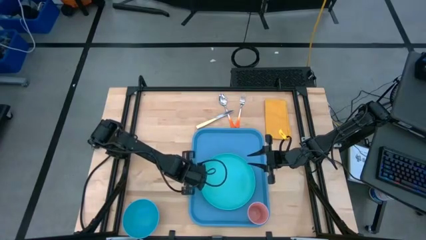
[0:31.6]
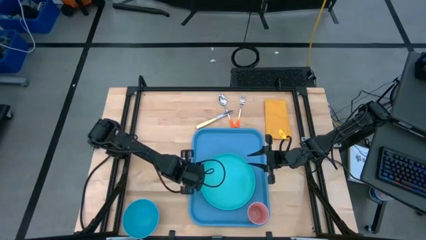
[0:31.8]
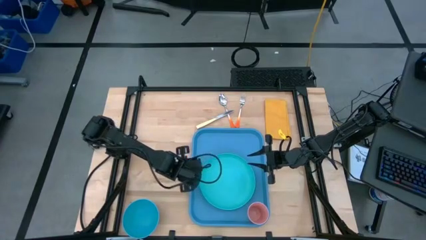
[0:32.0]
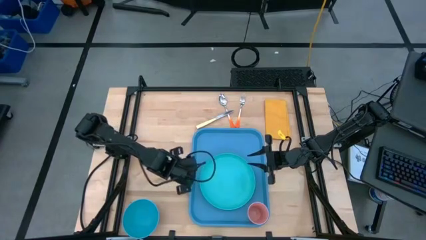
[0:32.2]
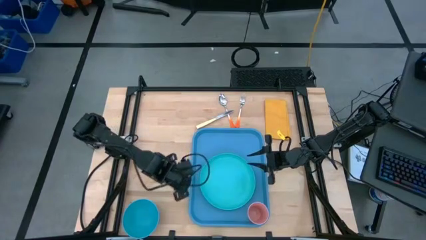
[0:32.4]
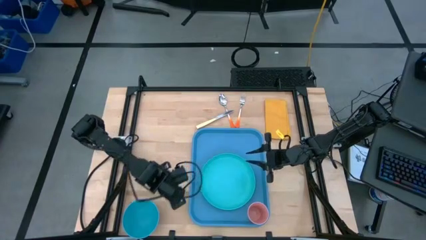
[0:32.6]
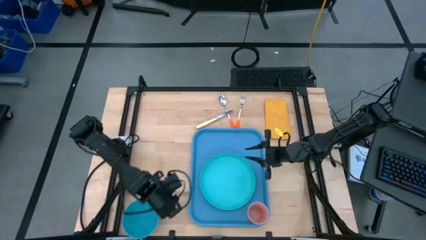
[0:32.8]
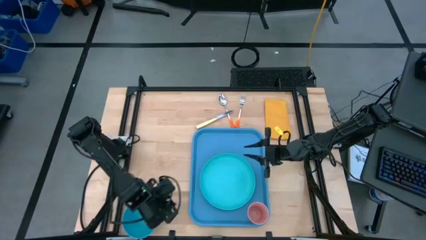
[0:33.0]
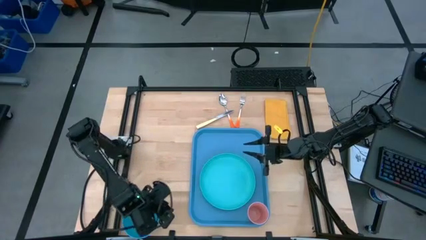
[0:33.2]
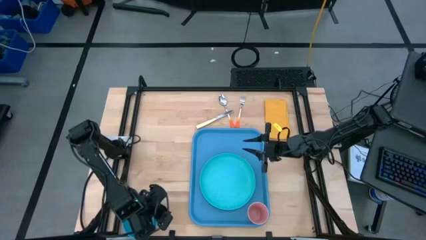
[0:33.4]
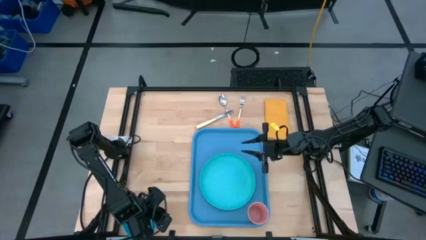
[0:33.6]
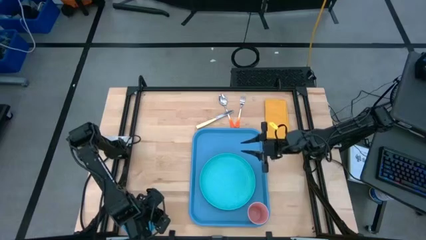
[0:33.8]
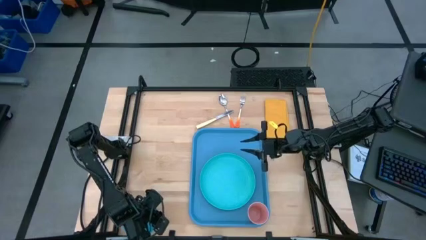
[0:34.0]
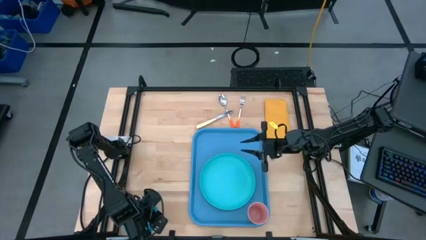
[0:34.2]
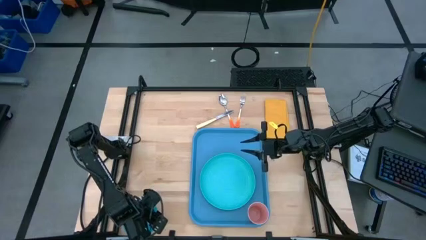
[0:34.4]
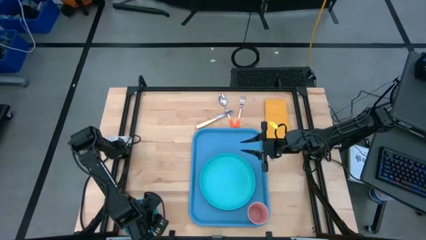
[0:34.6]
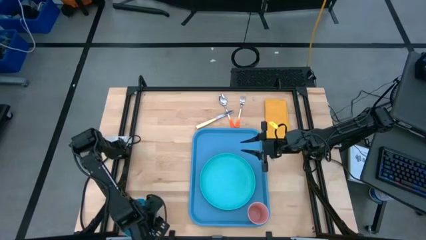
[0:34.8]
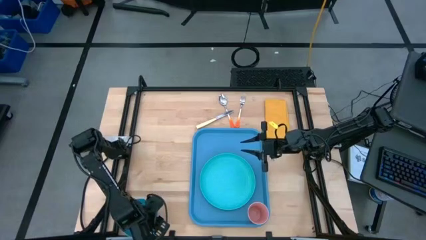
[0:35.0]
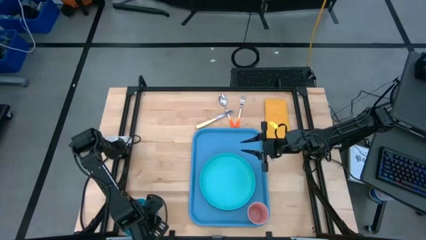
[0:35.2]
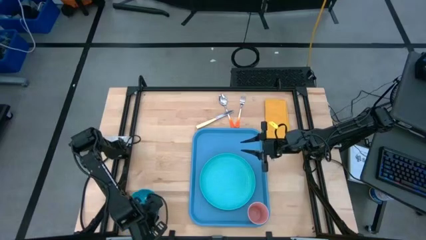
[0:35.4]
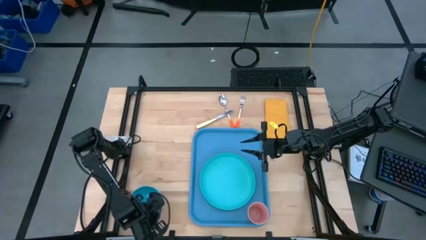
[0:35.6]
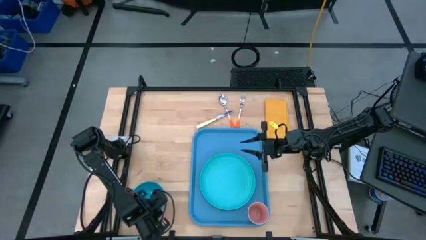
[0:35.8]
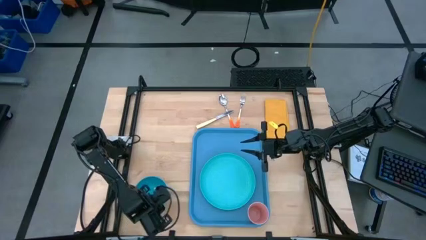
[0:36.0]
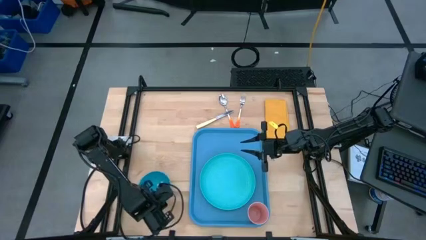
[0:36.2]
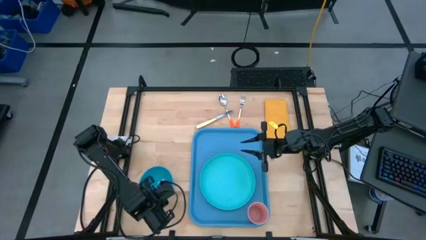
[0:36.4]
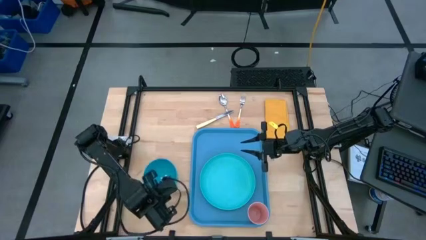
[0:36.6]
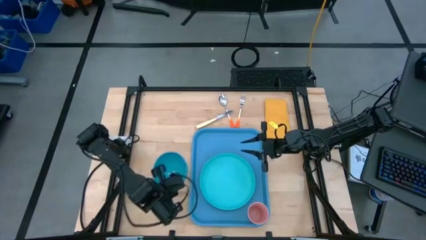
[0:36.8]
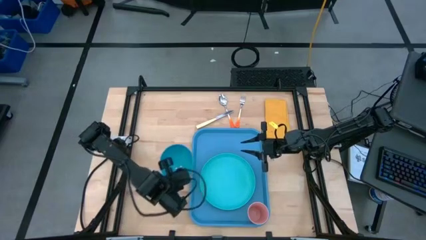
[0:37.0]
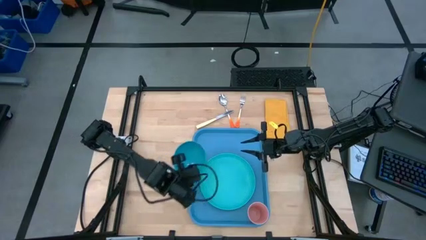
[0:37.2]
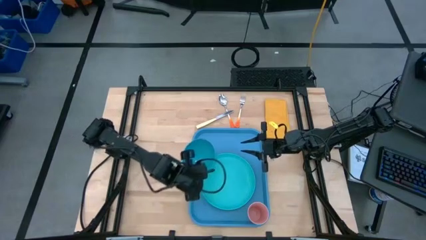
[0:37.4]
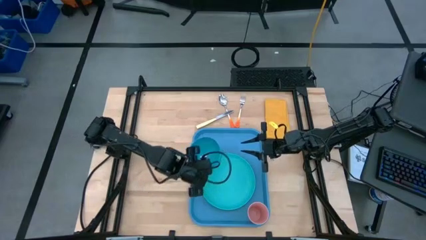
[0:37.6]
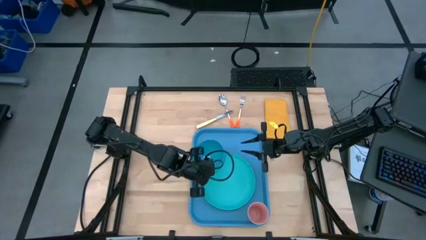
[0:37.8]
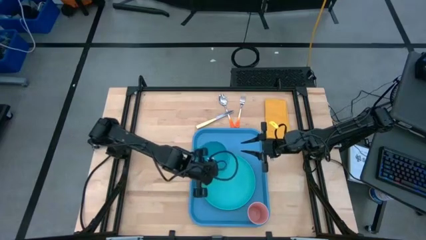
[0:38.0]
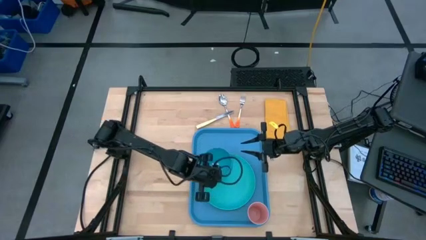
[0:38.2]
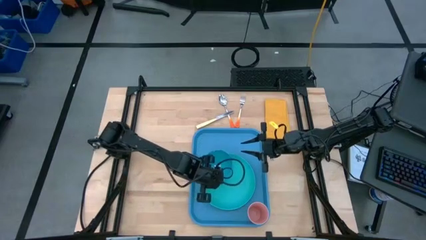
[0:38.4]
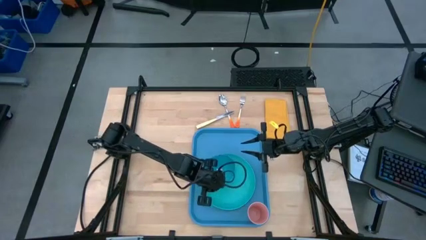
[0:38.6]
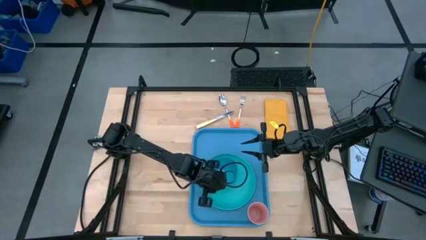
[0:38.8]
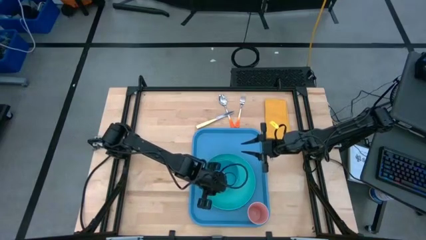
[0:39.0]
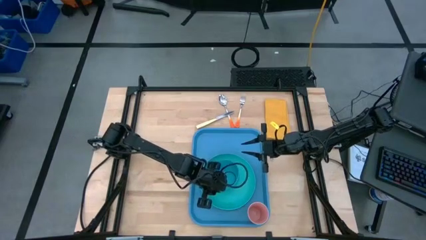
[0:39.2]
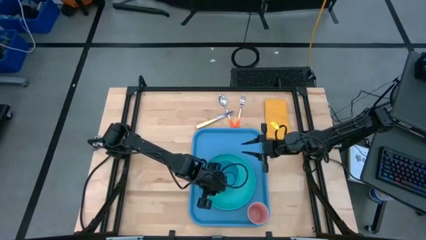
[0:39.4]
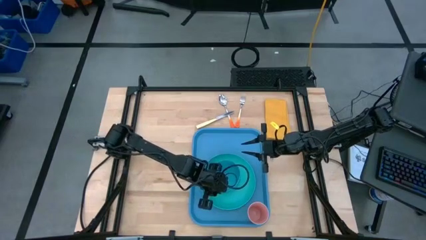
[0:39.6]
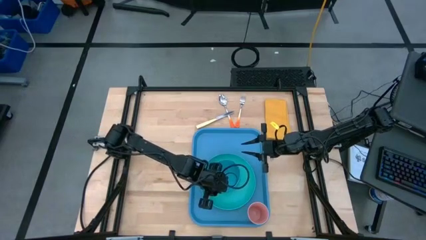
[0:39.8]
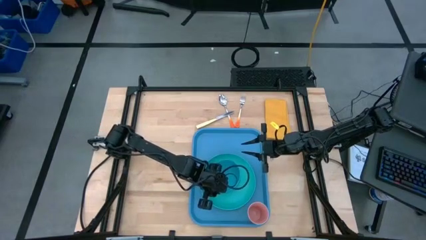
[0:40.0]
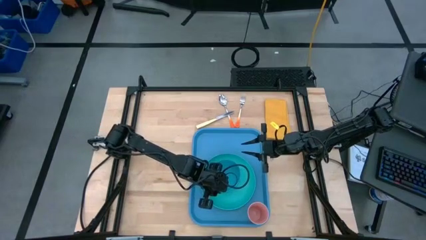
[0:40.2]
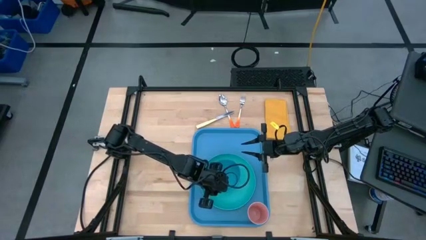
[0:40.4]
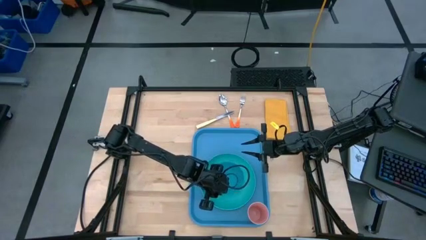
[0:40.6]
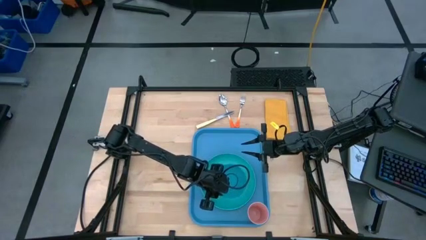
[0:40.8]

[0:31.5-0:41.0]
Task: Set up tray
Put the blue bowl on the plate on the blue serving tray

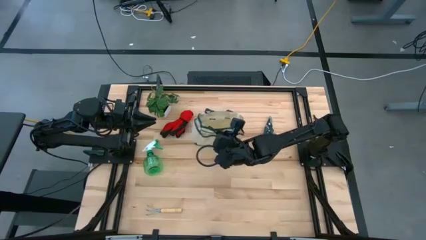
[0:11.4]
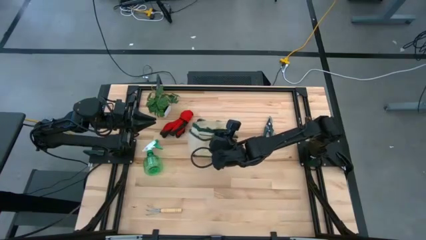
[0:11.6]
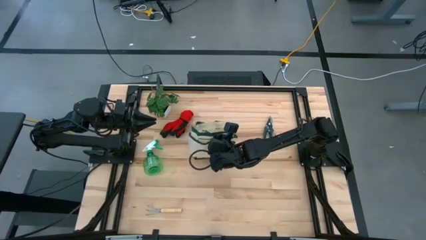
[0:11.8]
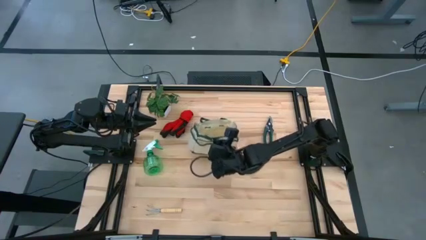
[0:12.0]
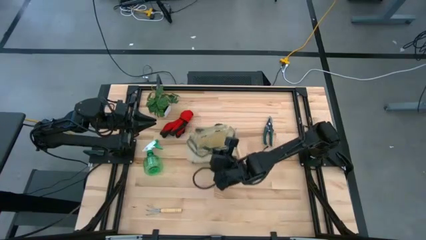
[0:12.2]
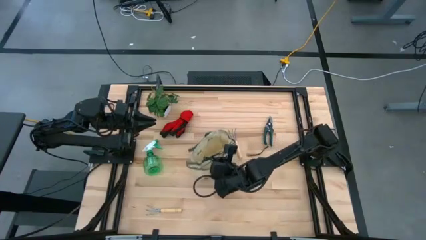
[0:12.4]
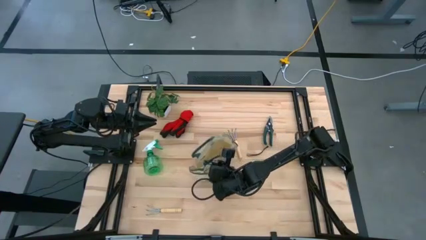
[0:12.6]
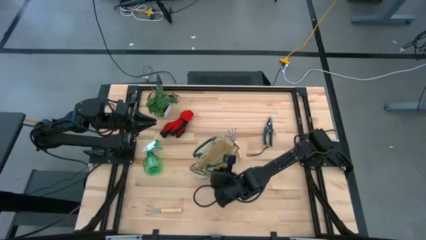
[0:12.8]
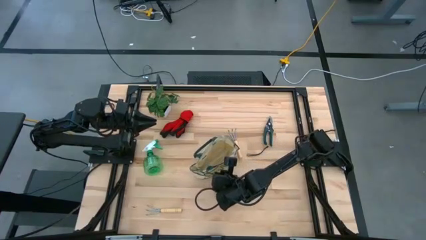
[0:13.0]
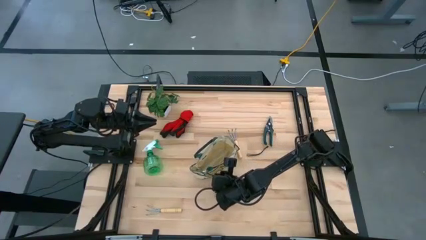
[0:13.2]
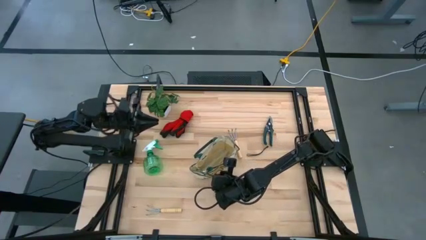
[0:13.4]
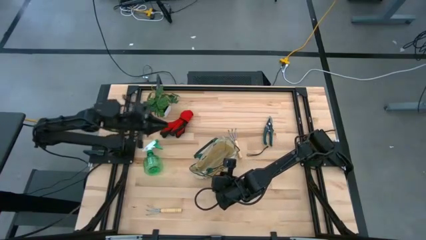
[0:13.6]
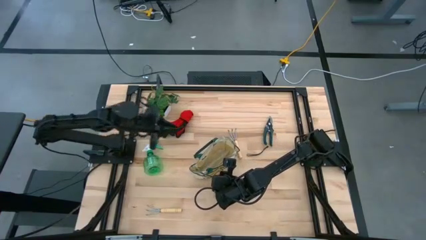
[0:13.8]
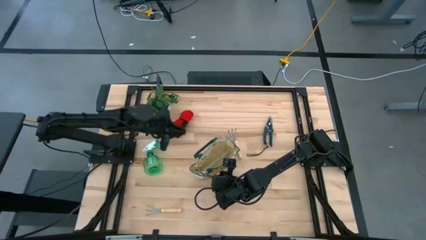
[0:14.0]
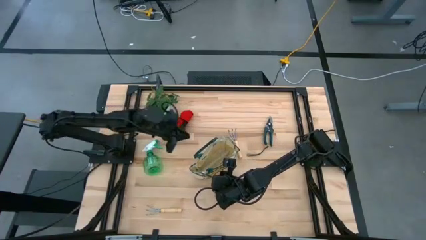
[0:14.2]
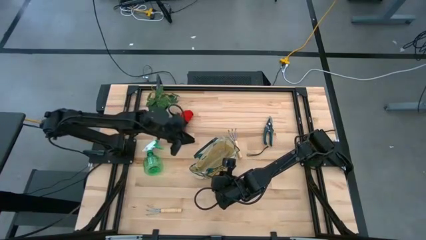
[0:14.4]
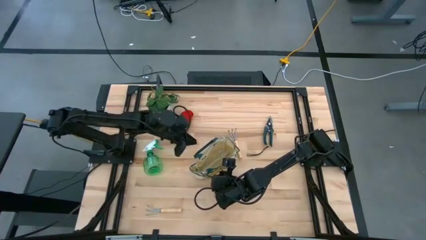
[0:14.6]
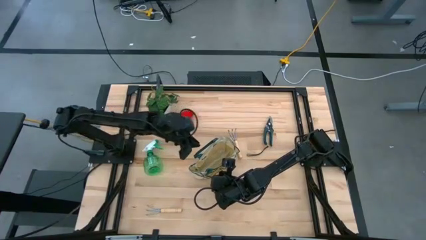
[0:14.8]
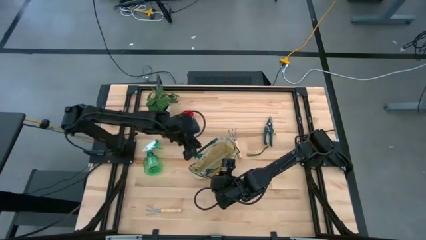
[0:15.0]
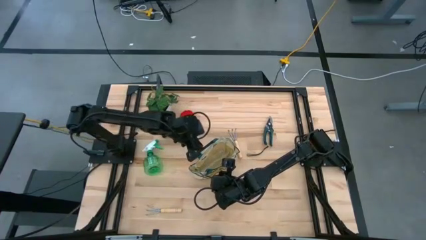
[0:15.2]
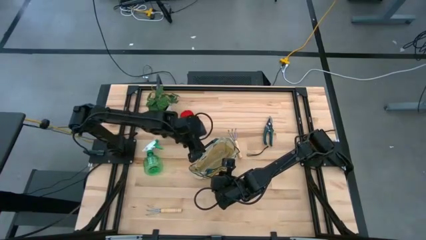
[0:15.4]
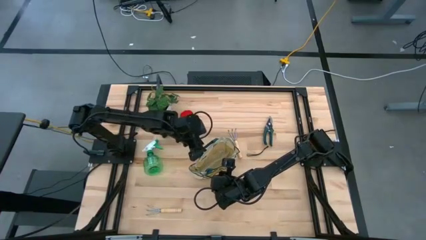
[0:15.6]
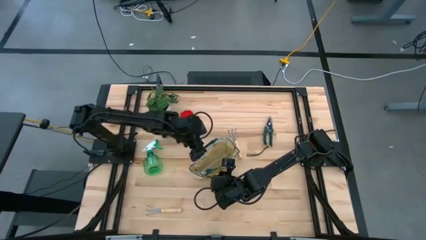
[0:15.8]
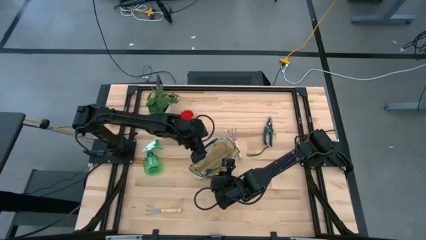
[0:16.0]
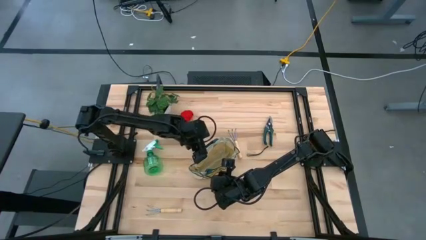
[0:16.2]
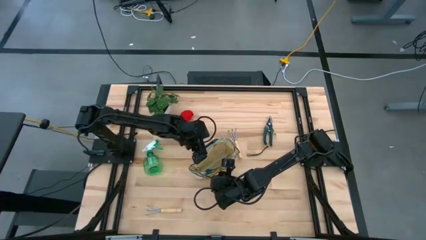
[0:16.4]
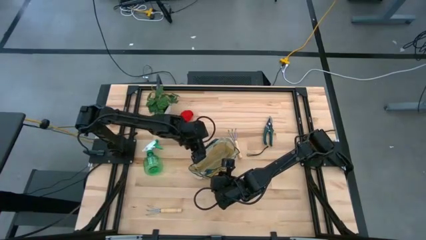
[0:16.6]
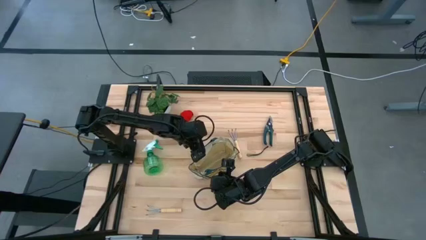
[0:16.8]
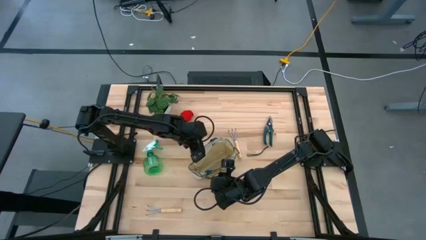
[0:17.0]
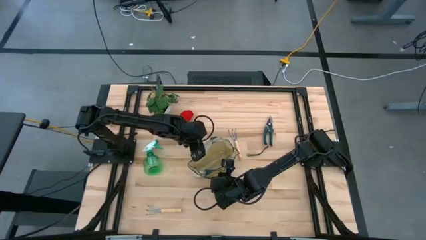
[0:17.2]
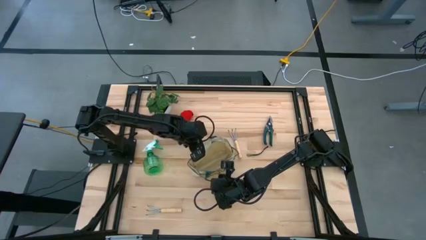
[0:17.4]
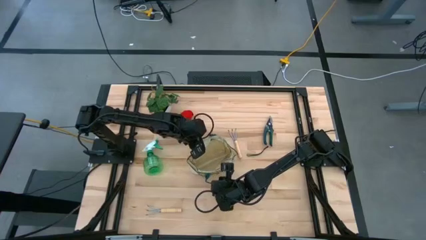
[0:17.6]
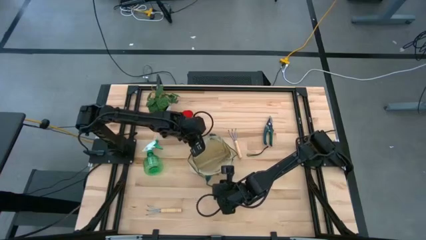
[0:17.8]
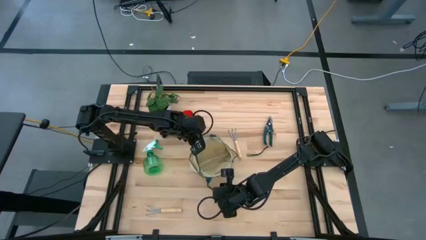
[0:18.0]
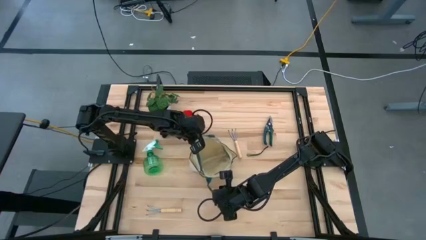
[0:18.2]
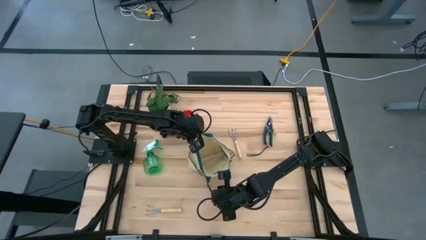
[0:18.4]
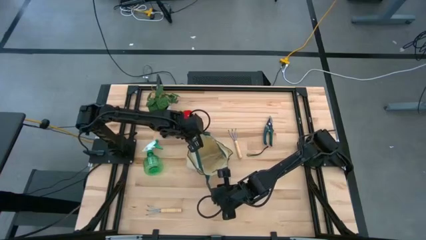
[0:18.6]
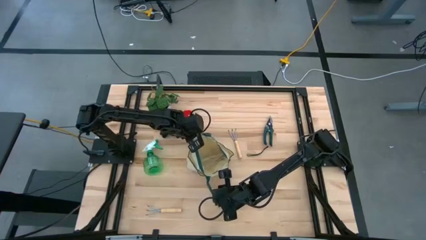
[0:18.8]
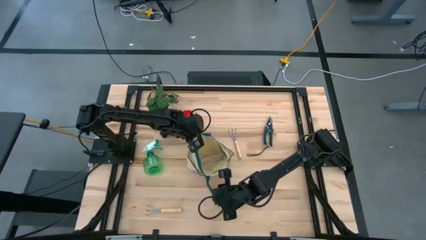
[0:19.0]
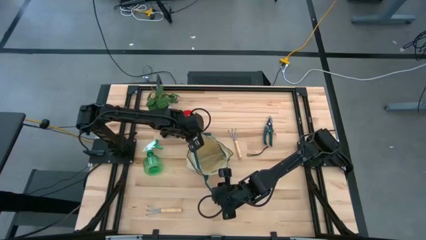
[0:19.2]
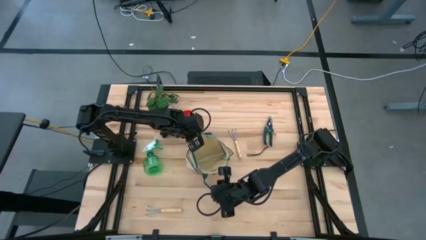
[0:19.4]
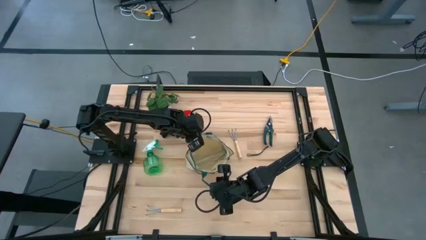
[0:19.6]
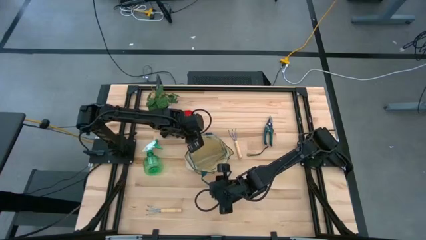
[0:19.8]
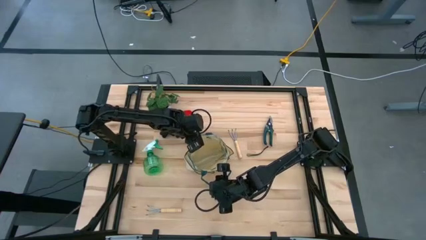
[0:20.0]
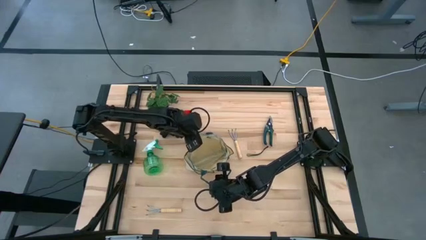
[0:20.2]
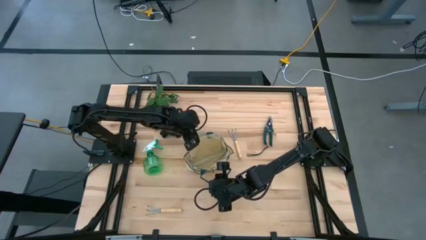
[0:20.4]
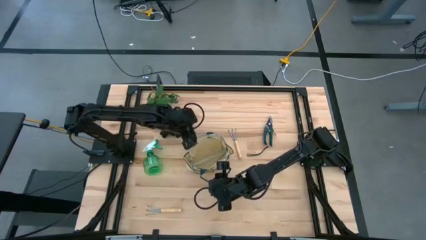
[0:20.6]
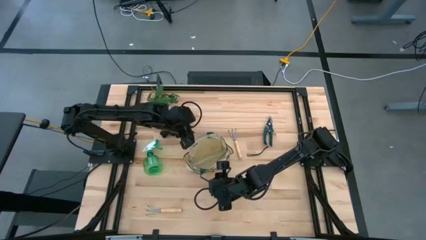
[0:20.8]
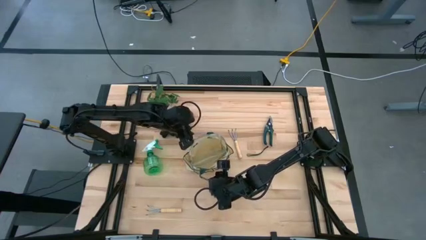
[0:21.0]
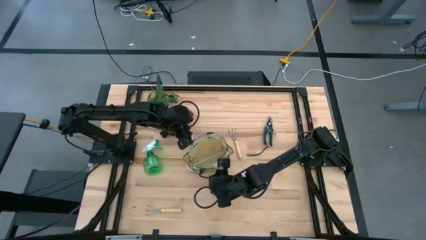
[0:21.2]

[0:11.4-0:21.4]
Task: Pick & Place Garden tools in Gardening bag
Prepare the gardening bag
